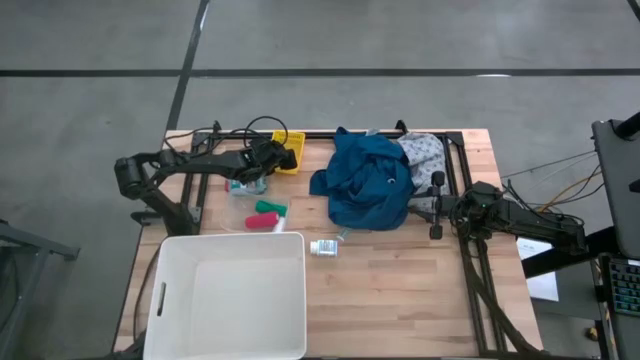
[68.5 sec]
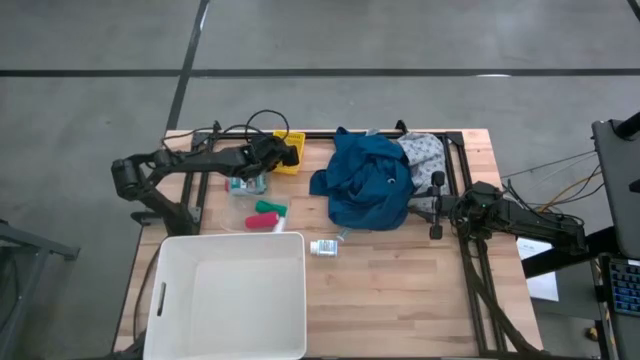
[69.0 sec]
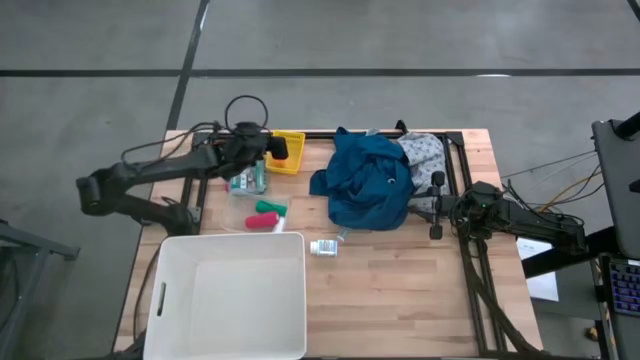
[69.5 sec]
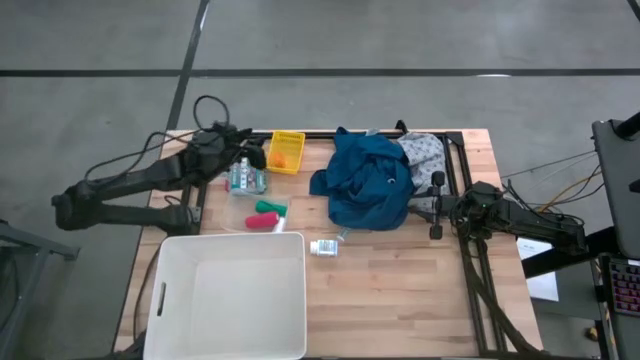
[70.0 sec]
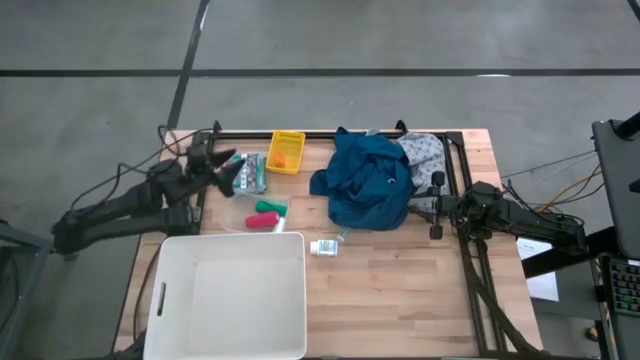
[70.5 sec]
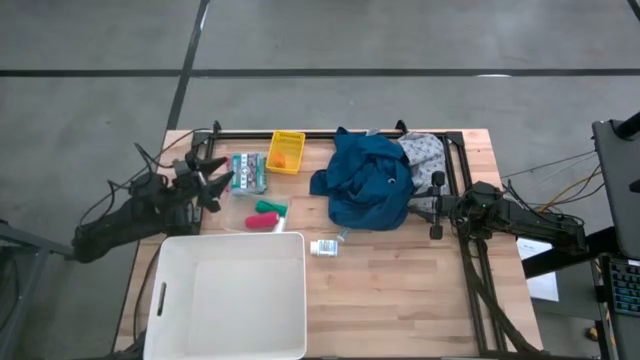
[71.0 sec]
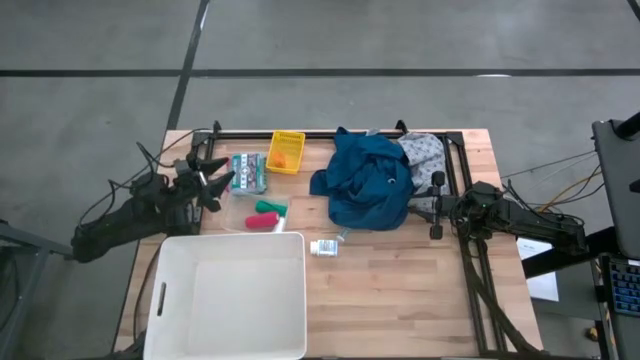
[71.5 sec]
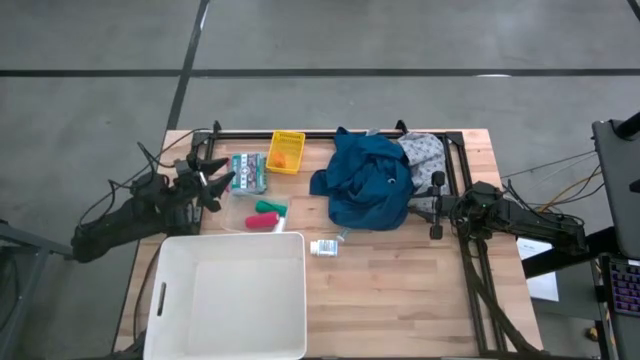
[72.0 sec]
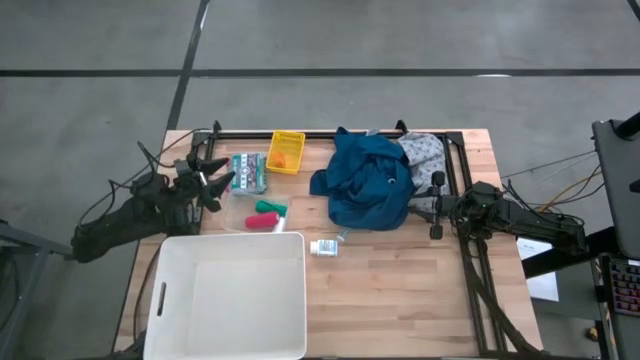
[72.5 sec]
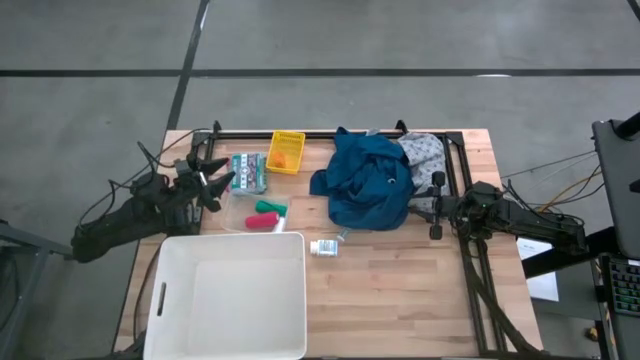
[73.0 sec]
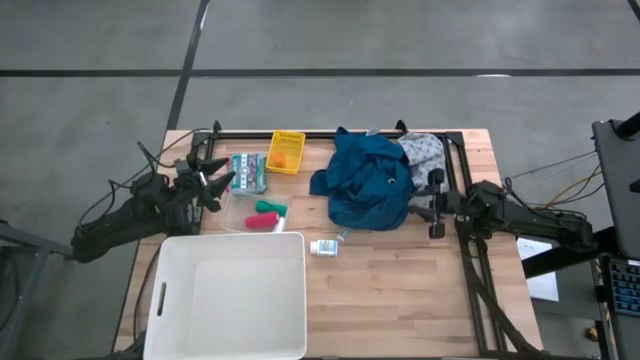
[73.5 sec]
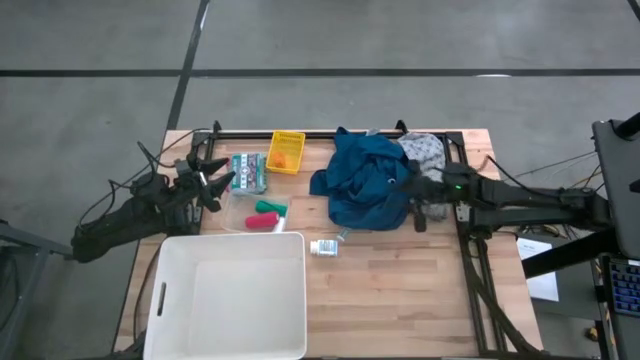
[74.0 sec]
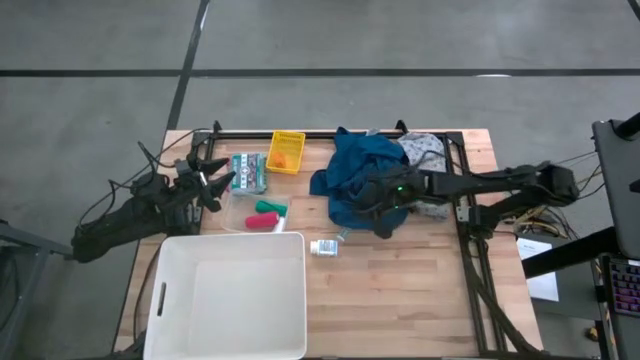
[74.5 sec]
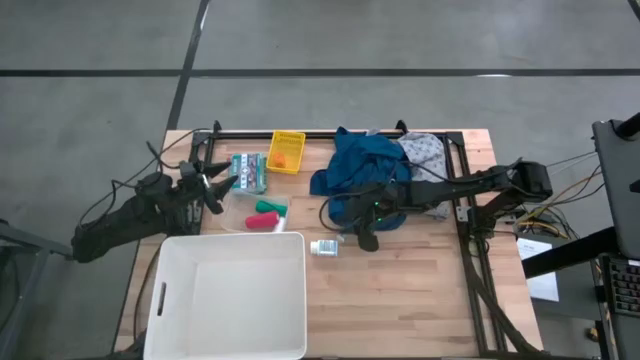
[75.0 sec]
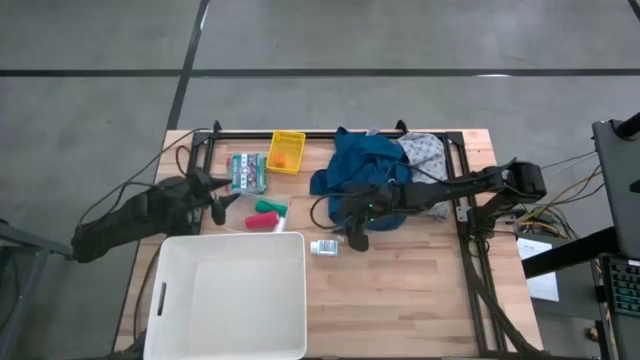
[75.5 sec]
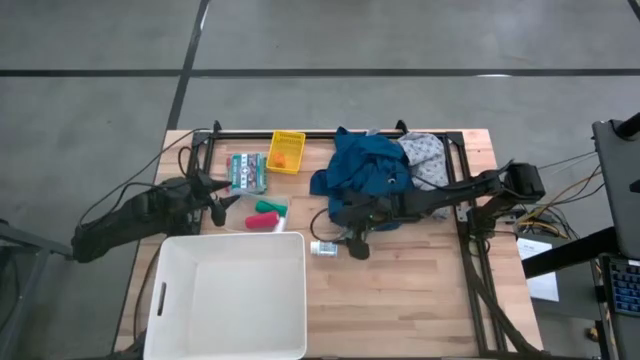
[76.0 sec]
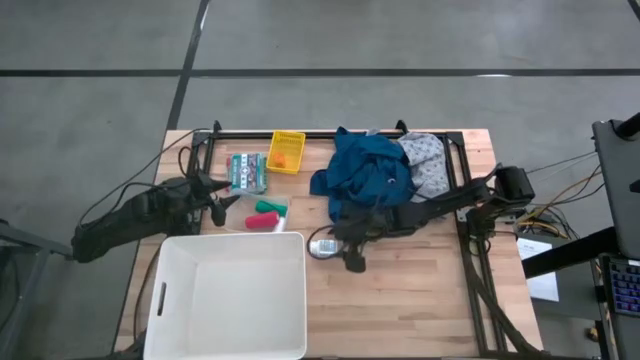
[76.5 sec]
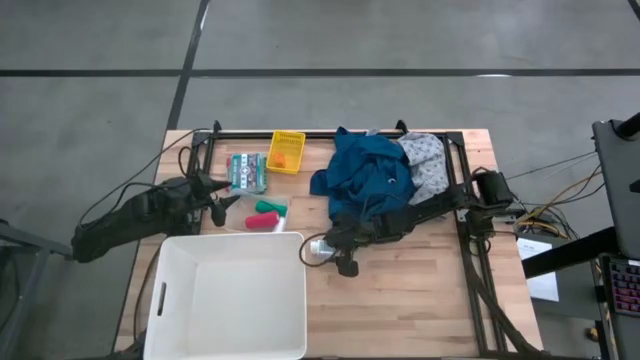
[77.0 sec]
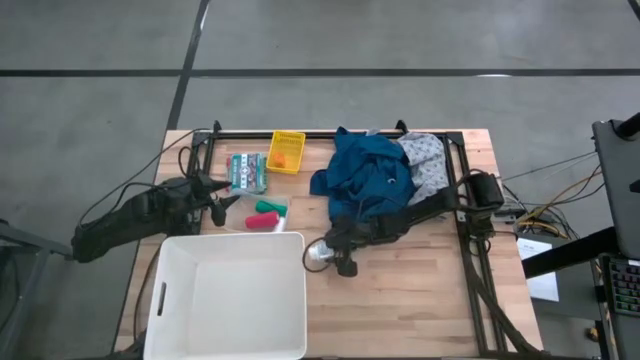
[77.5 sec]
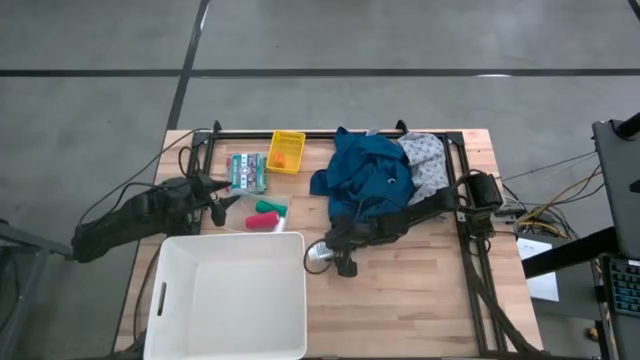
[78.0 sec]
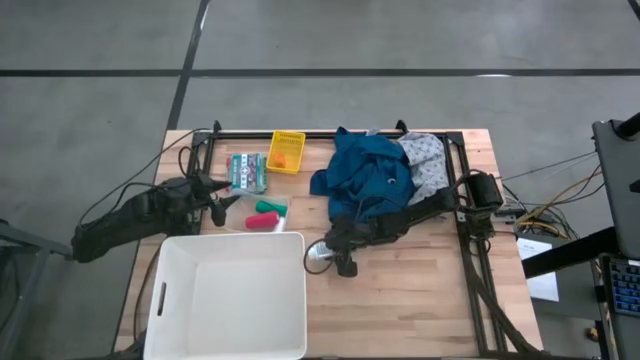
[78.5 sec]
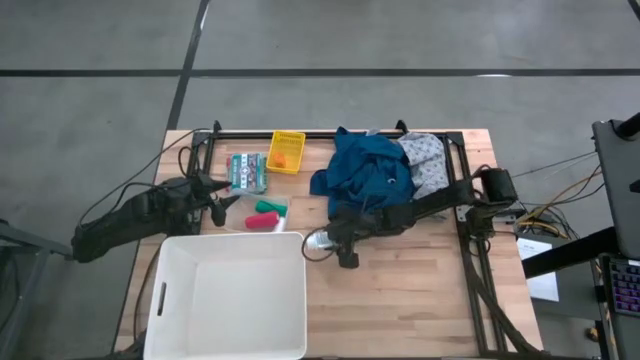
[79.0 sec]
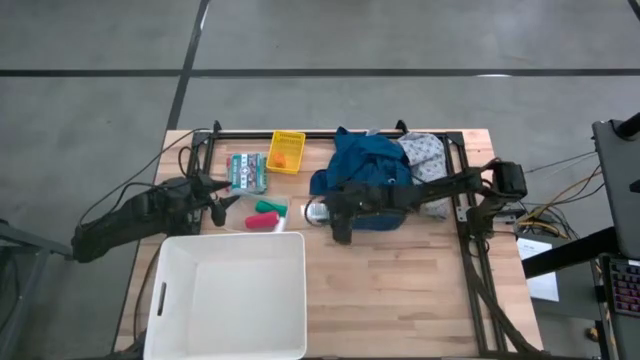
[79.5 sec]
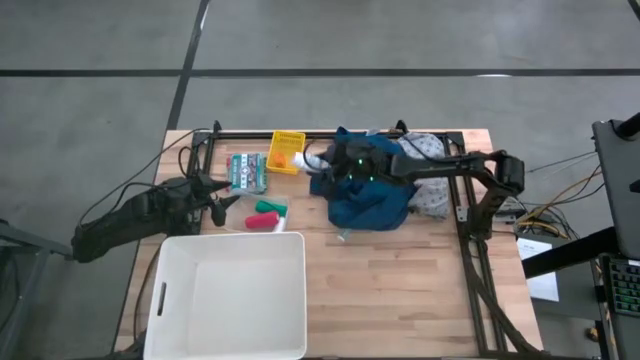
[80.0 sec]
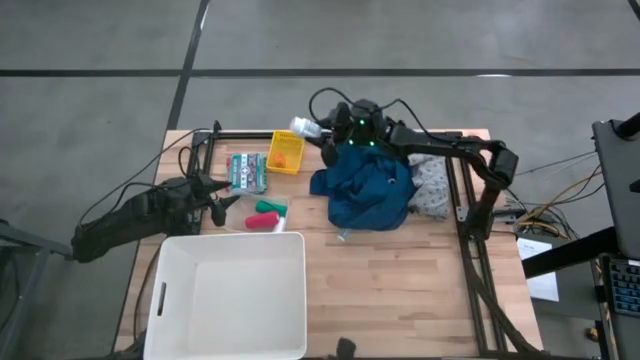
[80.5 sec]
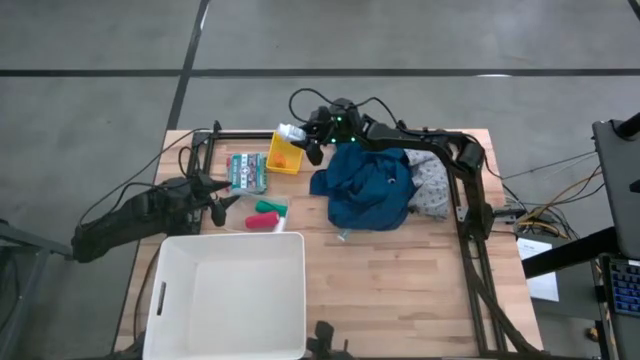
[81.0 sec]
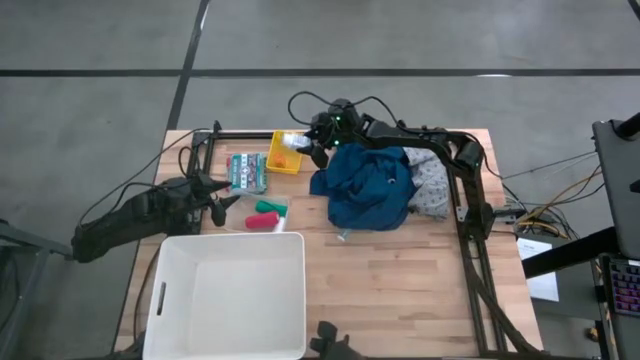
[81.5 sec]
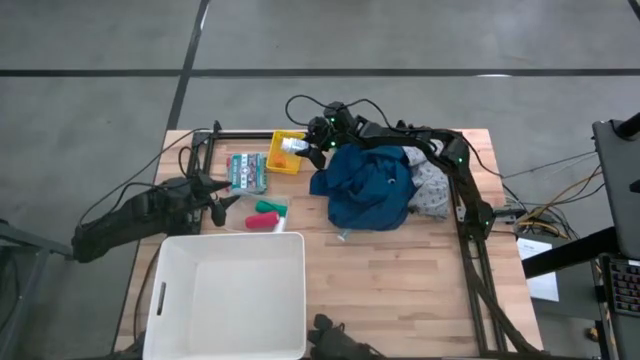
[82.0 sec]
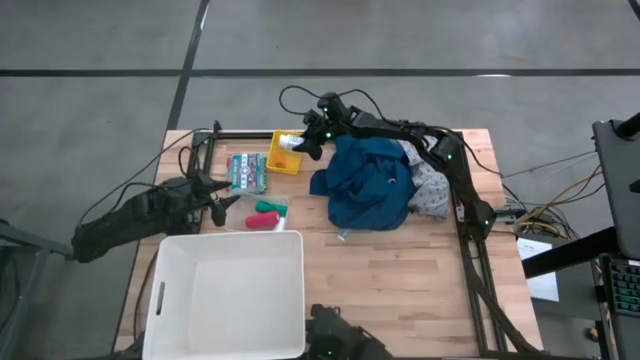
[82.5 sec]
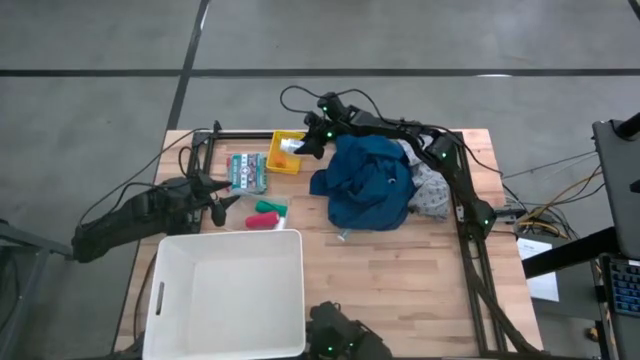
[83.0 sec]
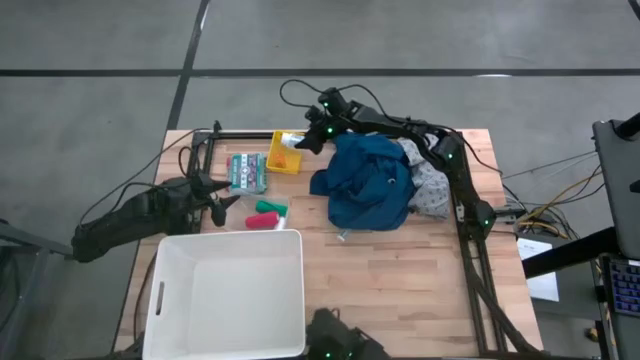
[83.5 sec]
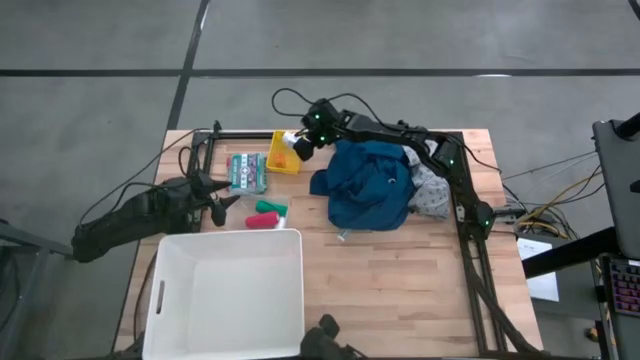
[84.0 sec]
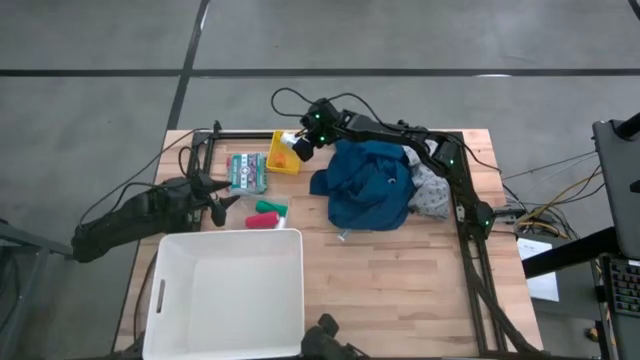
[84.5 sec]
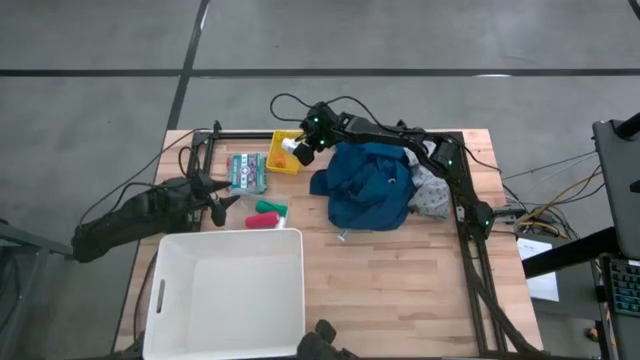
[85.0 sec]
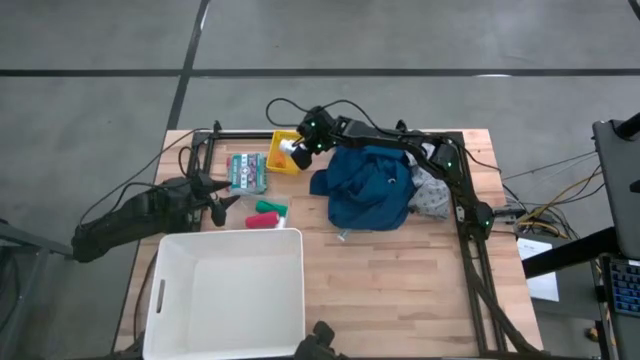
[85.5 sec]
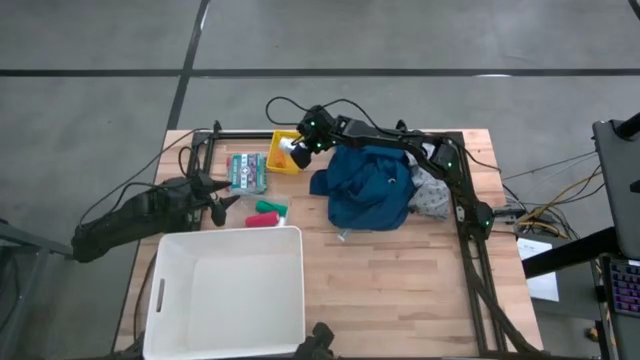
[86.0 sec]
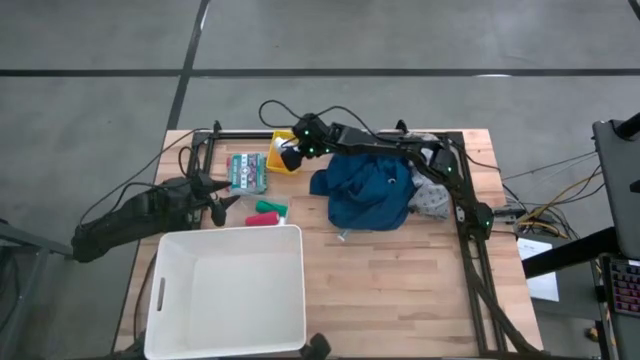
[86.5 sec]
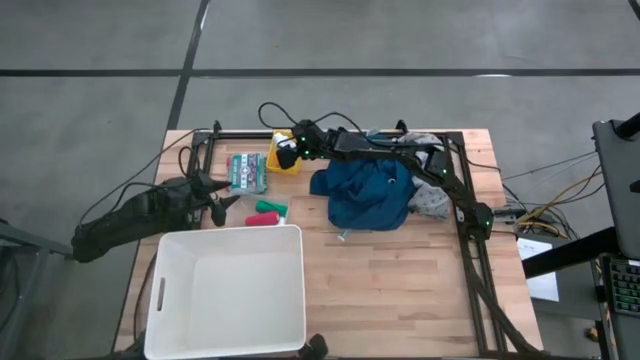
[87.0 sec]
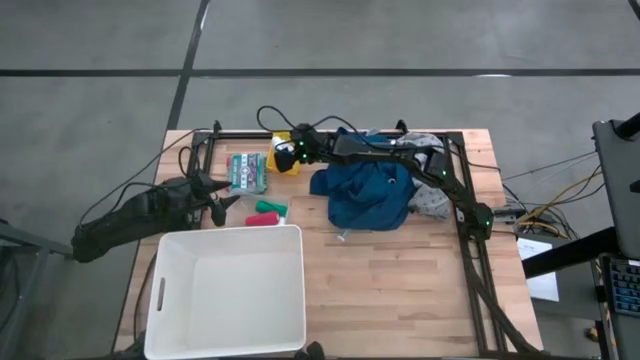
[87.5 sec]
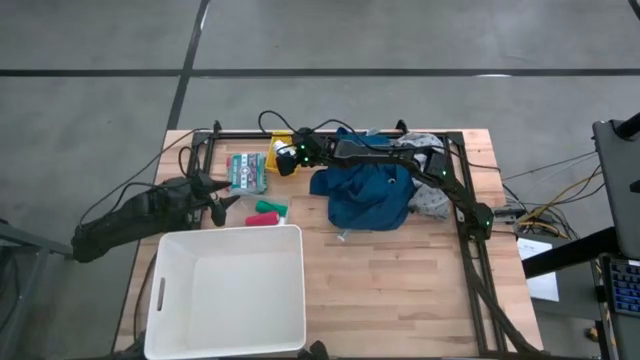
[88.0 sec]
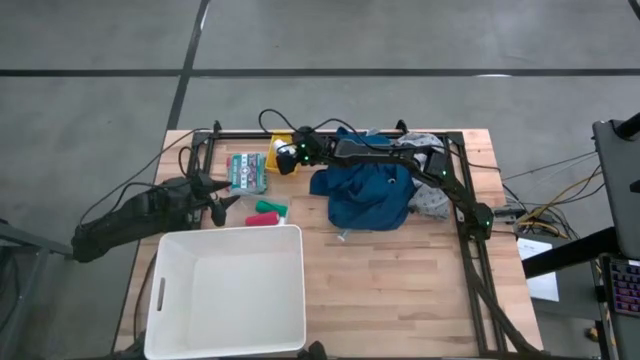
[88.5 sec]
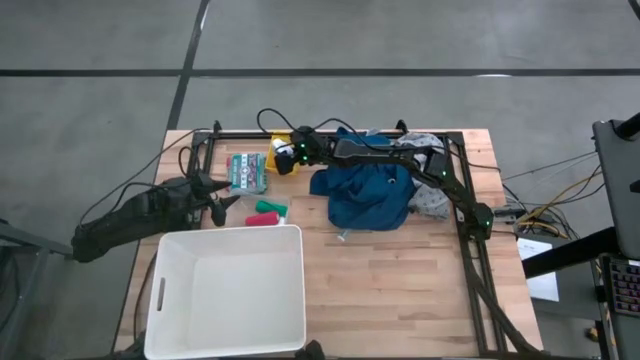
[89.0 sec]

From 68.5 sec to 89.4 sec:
Task: Pick & place medical supplies in basket/bin
Put the white pill bottle into the yellow bin
